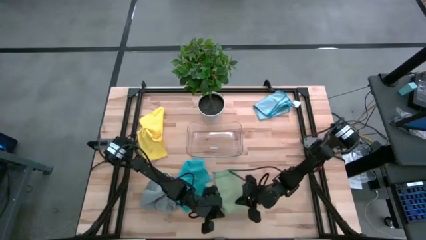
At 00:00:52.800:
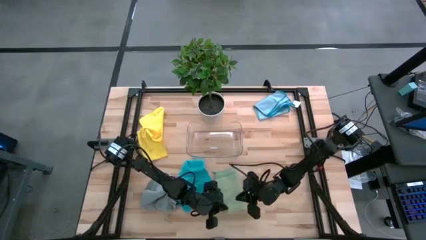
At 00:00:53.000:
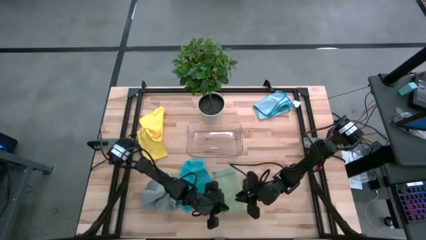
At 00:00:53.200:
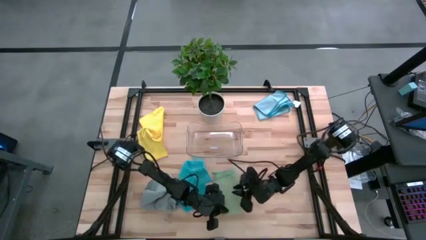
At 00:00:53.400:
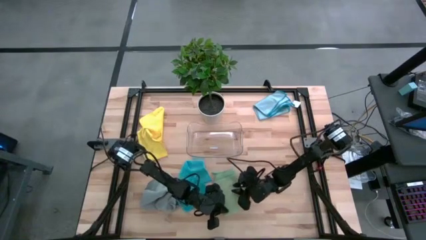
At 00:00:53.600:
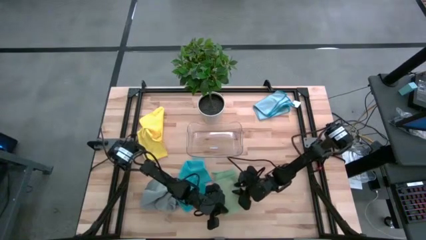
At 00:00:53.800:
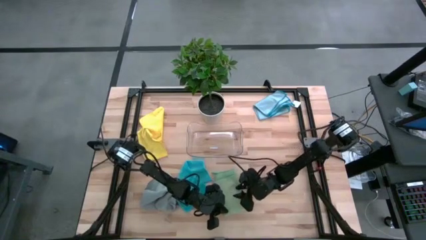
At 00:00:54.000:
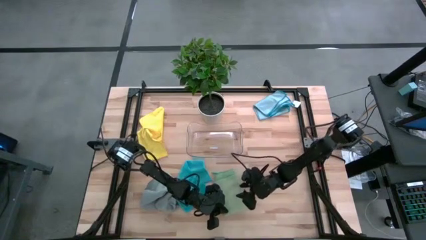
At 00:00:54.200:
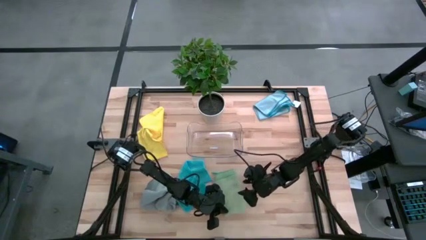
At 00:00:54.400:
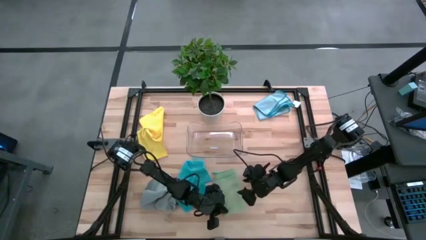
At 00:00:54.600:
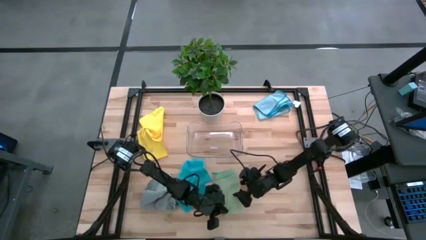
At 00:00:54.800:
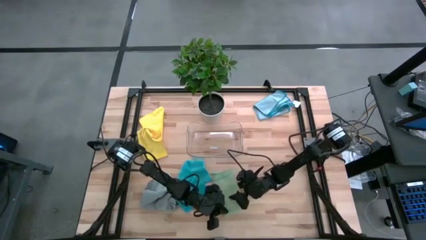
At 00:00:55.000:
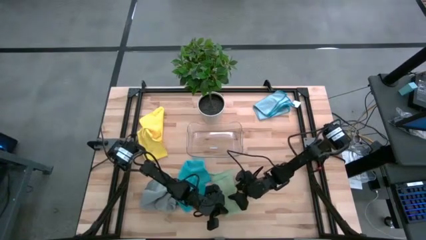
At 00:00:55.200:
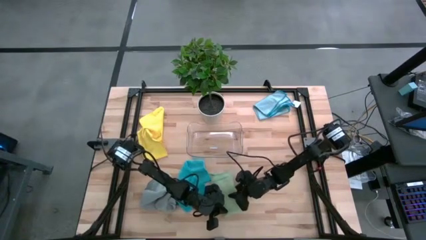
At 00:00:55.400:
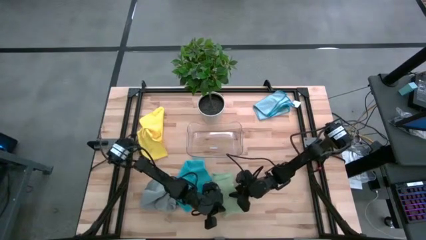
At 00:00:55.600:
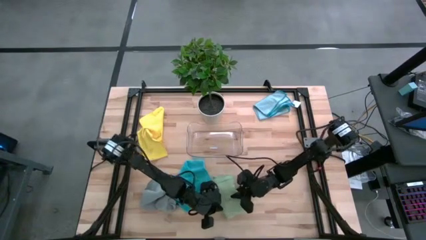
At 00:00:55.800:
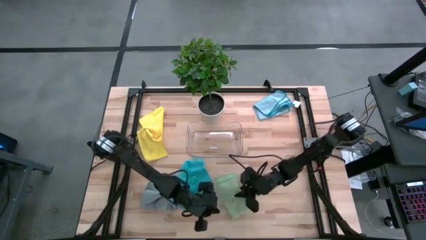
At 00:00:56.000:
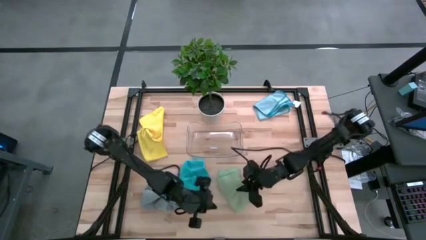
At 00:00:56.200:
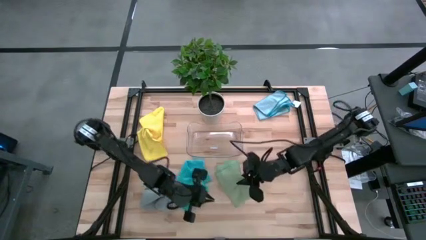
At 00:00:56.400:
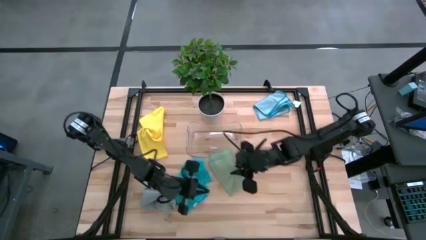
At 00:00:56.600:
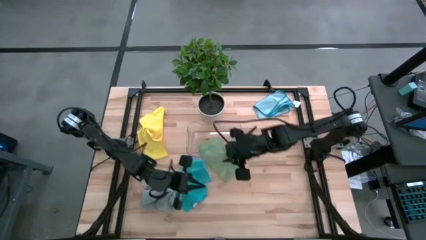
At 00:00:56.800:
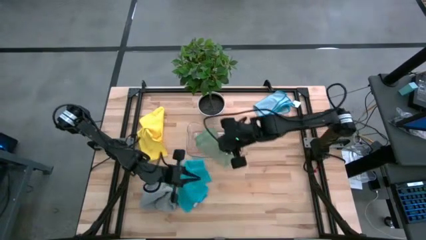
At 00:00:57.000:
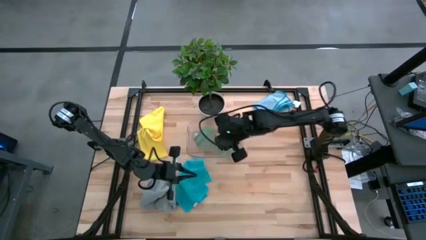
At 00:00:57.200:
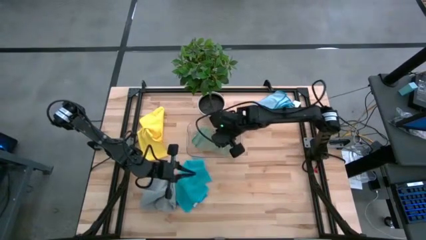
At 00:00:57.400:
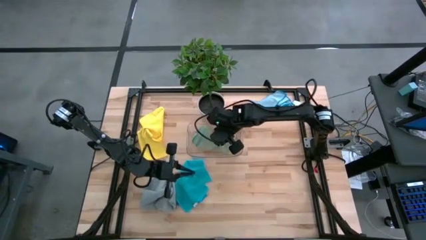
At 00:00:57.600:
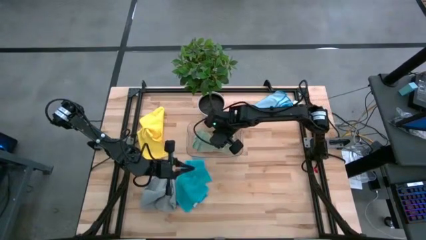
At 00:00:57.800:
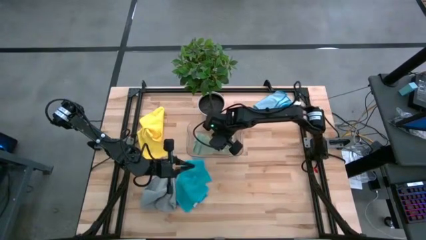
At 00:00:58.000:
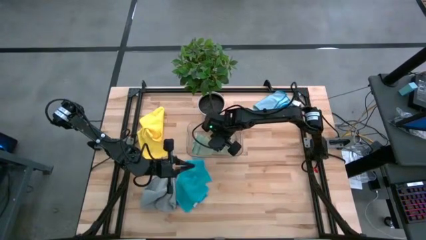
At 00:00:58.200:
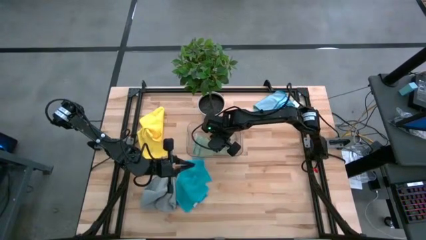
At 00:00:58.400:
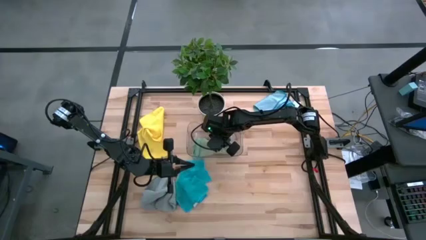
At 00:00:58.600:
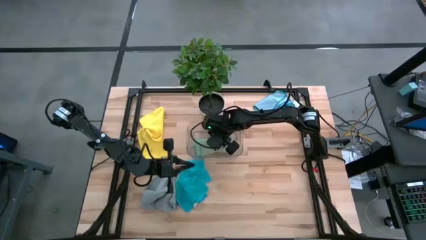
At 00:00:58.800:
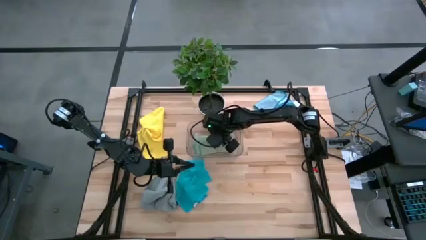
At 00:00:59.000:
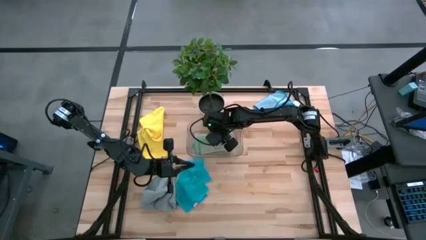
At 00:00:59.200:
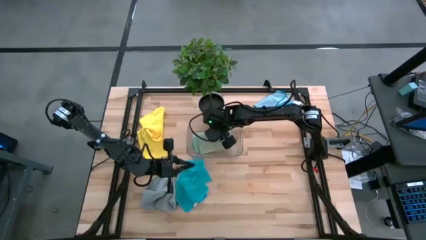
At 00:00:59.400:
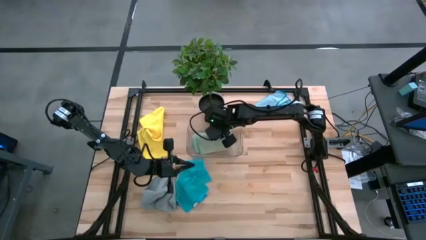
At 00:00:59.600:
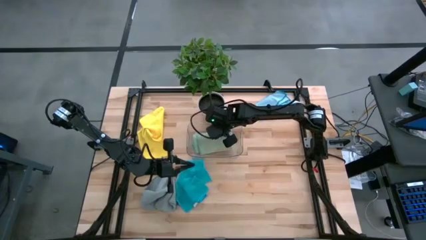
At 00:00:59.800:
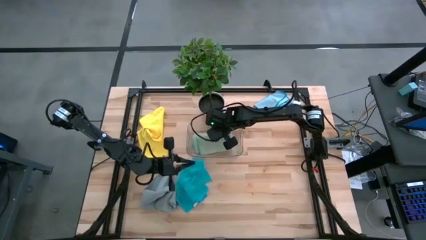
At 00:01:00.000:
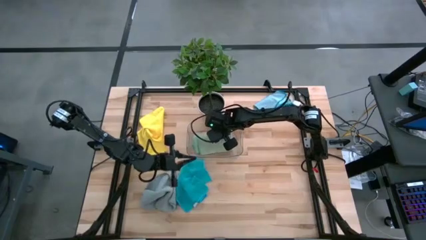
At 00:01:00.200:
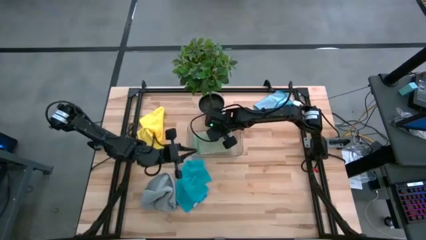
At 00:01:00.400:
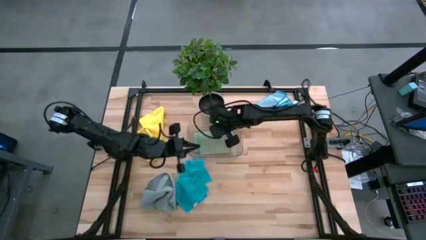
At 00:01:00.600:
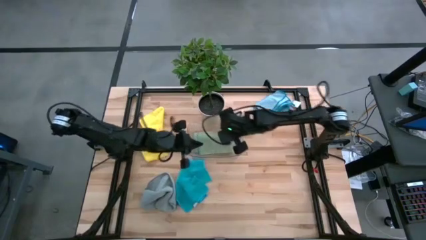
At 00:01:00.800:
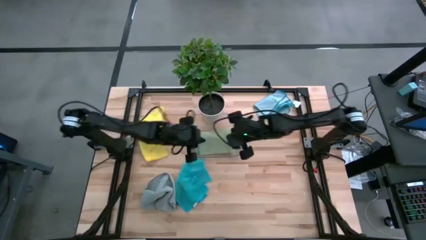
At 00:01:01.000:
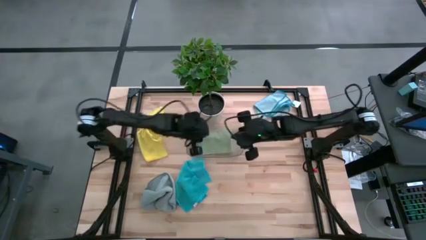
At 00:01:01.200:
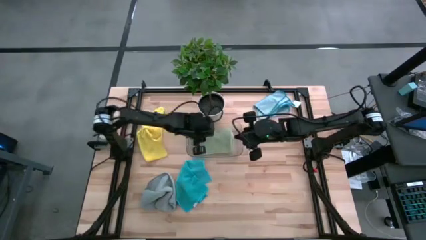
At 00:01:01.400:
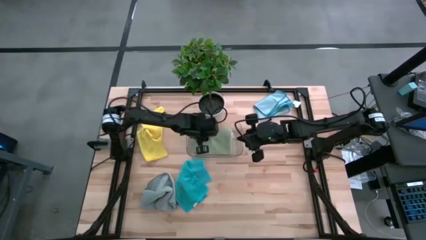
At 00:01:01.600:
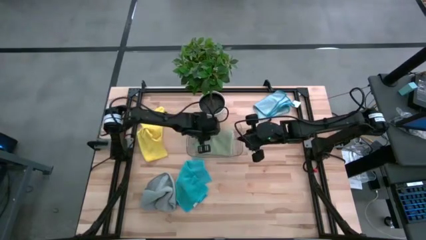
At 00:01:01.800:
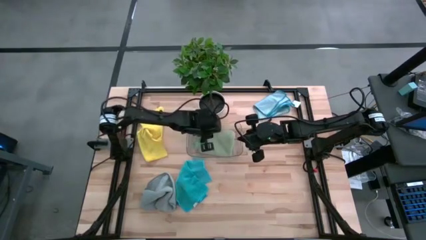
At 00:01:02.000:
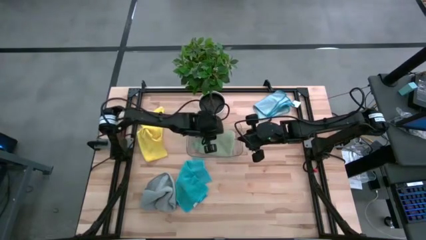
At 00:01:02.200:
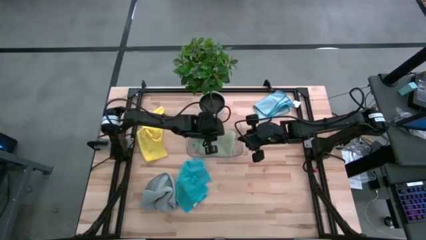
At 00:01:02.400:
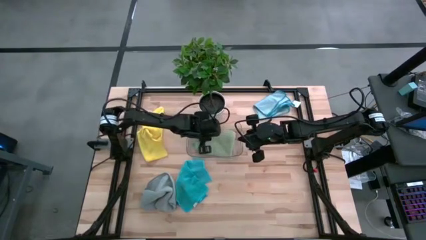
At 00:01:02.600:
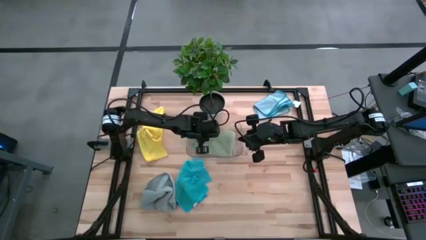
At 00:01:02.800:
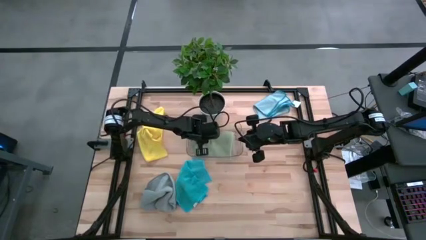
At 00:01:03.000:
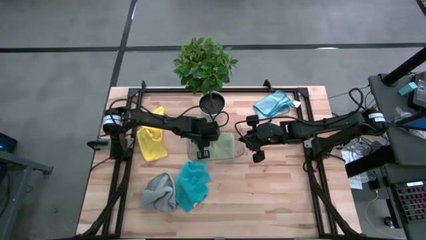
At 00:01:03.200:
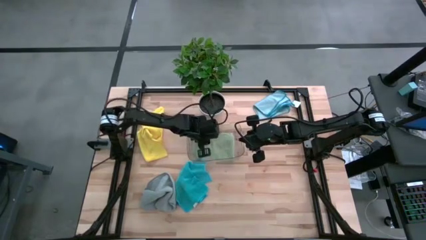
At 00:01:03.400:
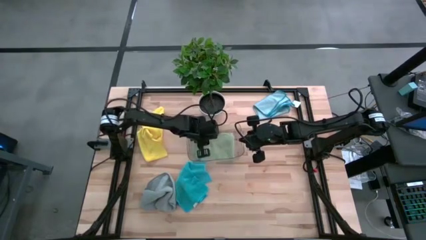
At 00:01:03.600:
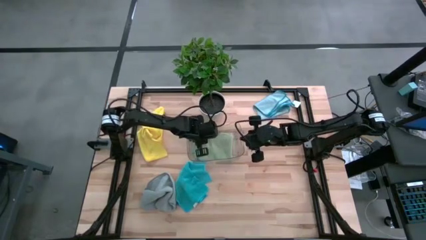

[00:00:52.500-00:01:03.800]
Task: Fold microfiber towels
Put the folded green towel into the transparent bin
